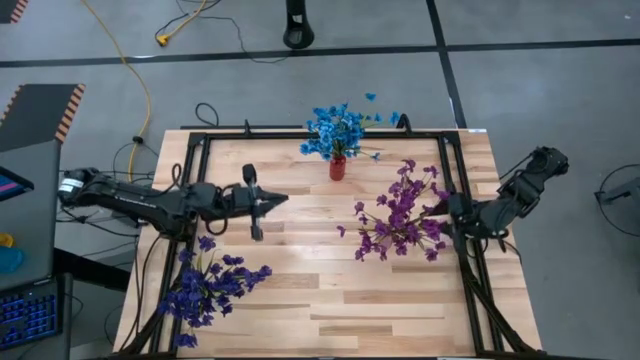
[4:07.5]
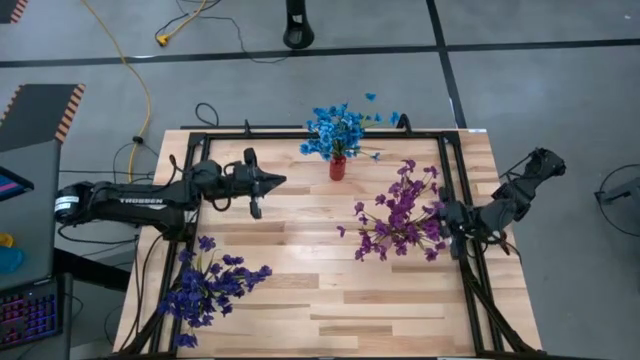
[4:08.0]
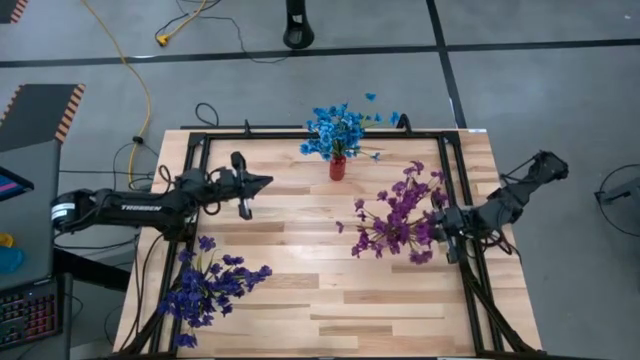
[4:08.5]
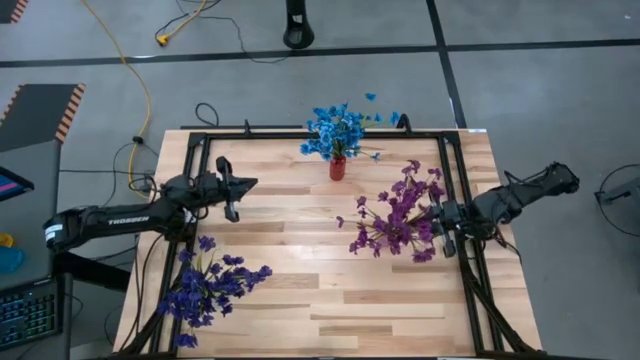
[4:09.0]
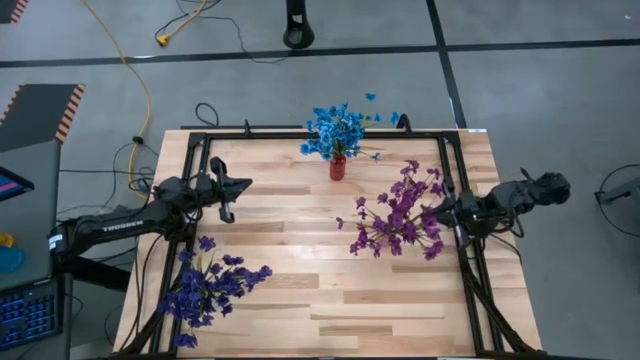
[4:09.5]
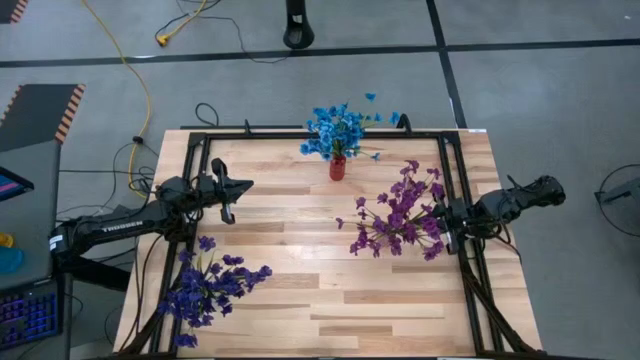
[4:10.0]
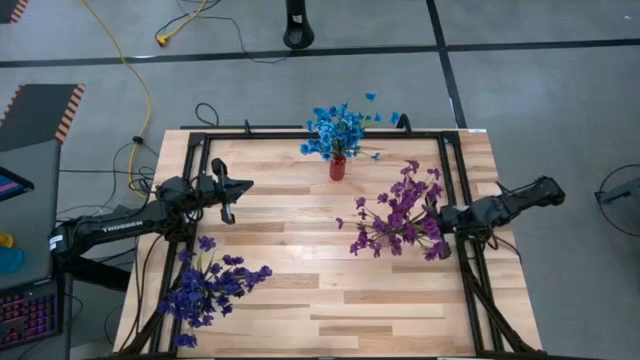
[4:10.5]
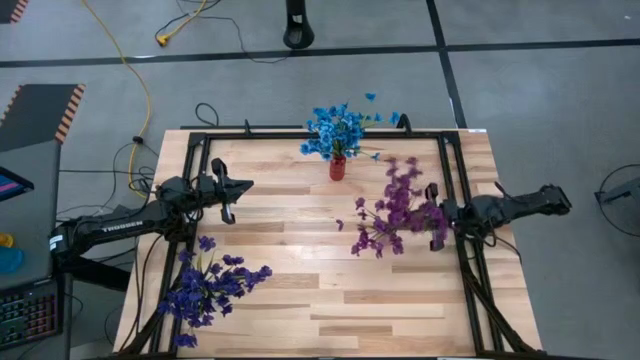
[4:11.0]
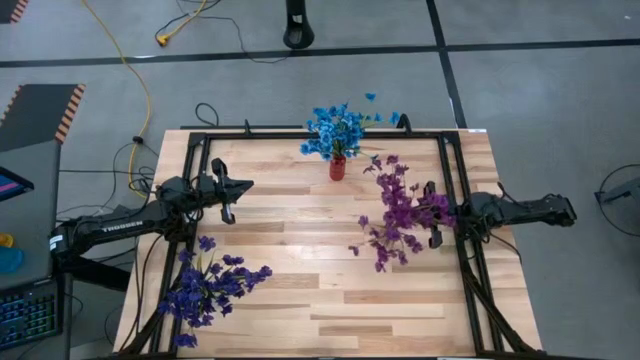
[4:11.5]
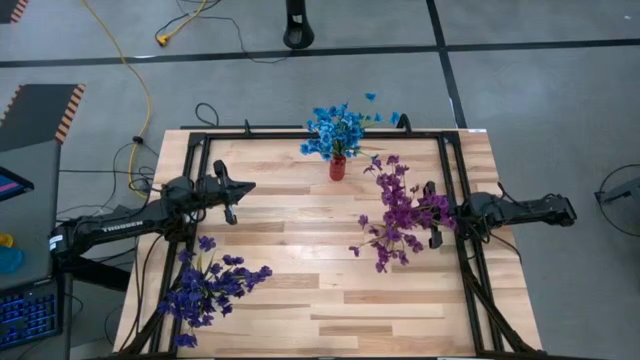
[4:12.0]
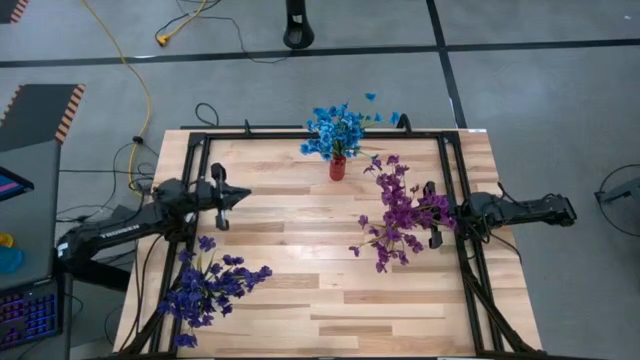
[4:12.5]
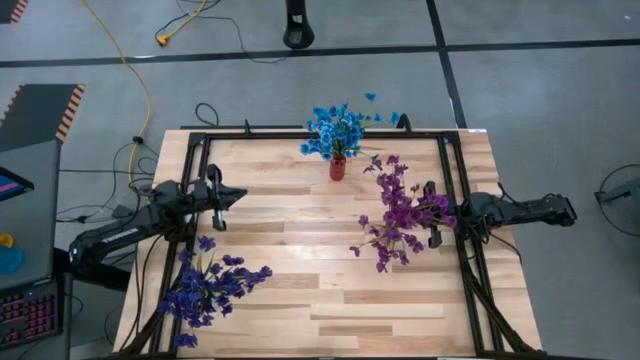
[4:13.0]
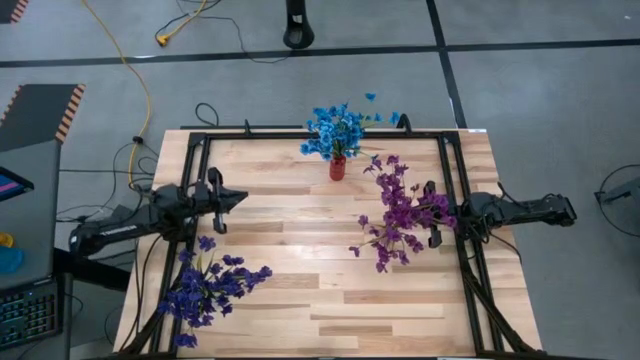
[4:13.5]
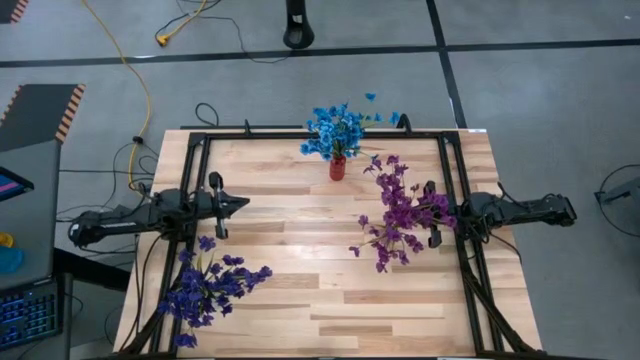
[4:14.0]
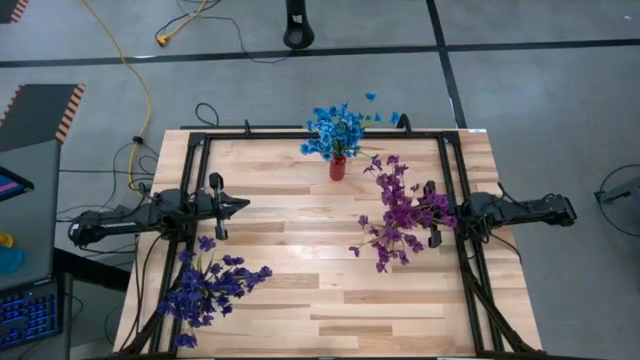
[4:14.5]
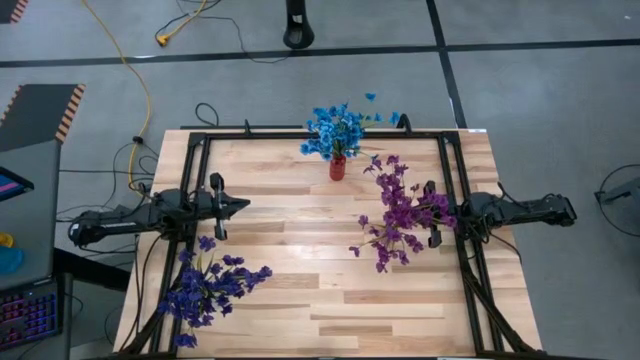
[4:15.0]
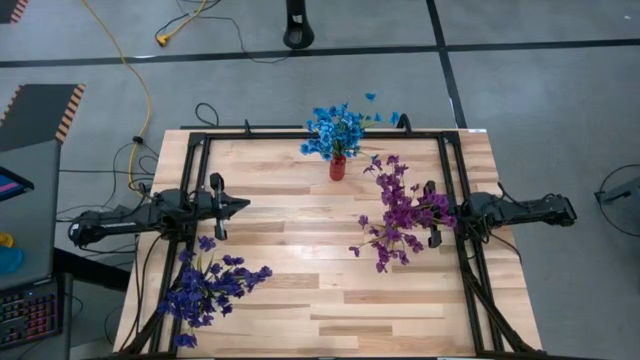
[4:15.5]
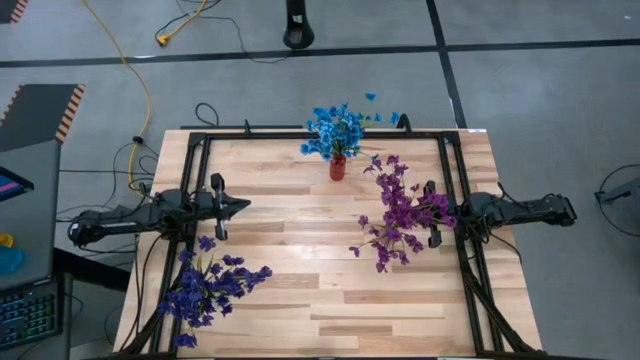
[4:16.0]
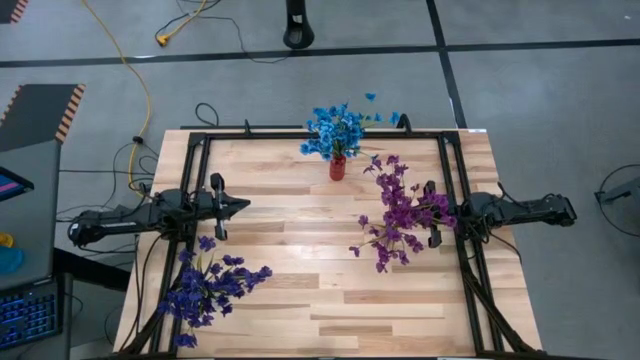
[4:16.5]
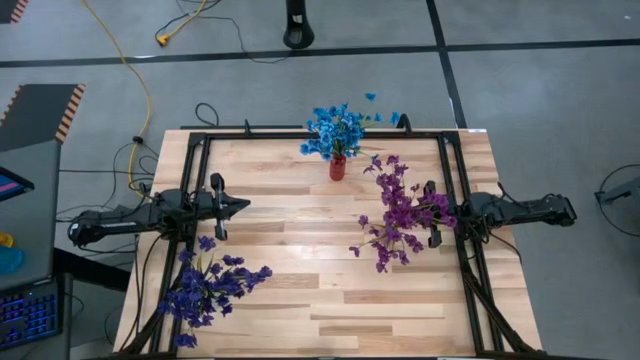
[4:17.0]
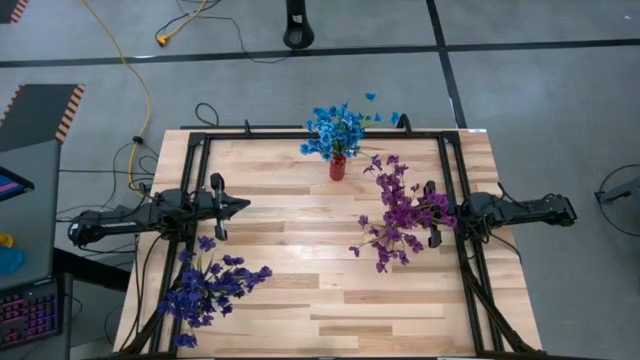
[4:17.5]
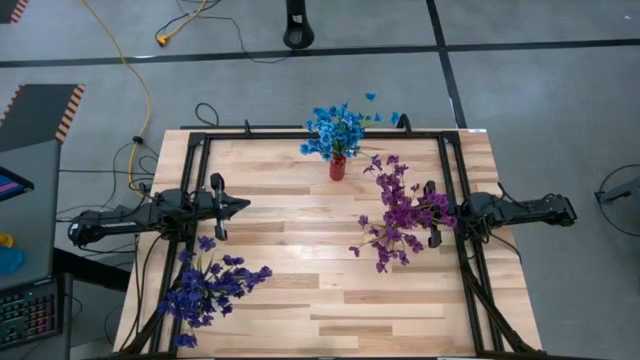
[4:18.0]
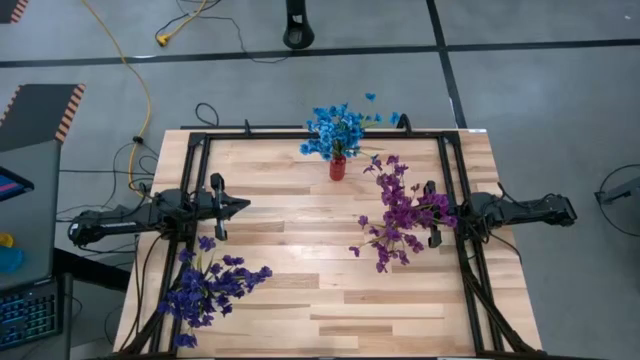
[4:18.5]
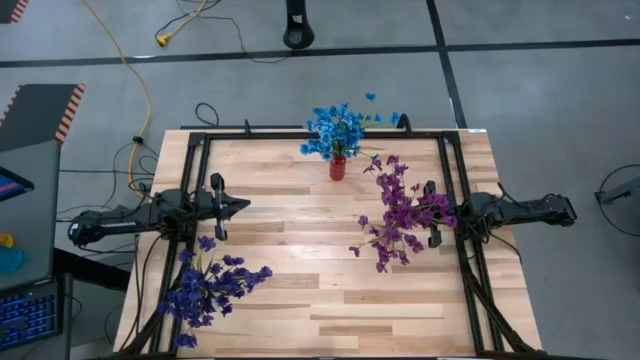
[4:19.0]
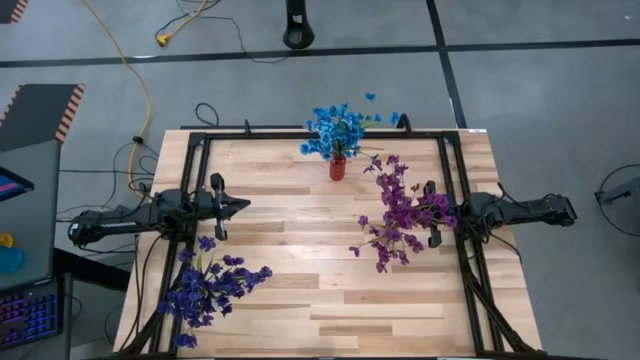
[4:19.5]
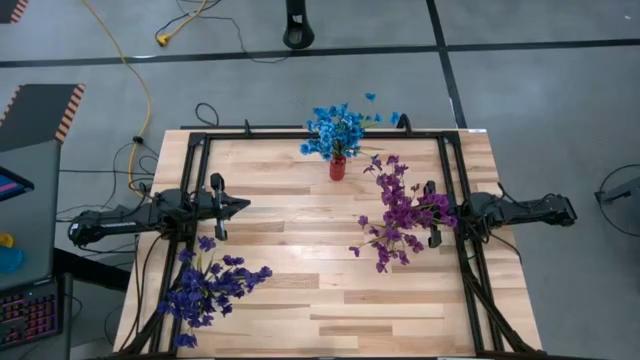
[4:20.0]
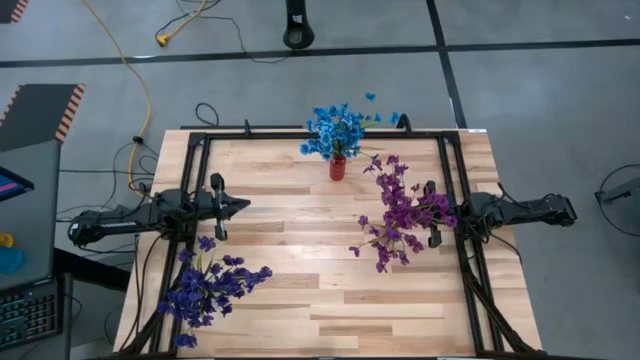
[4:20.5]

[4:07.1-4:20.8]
Task: Sort flowers into vase by color
Return to Home Position

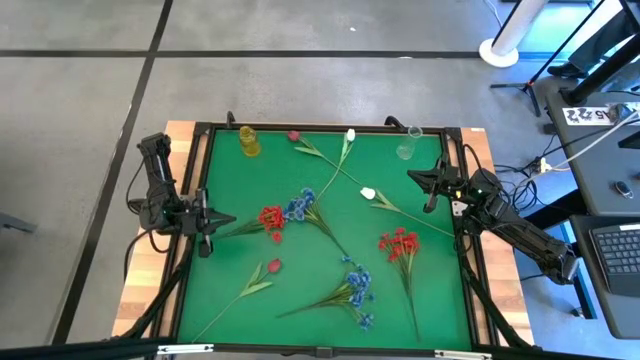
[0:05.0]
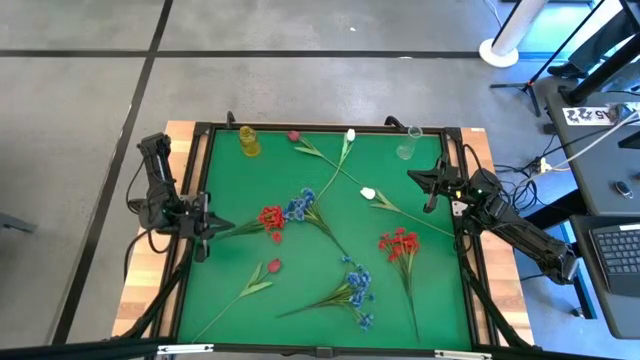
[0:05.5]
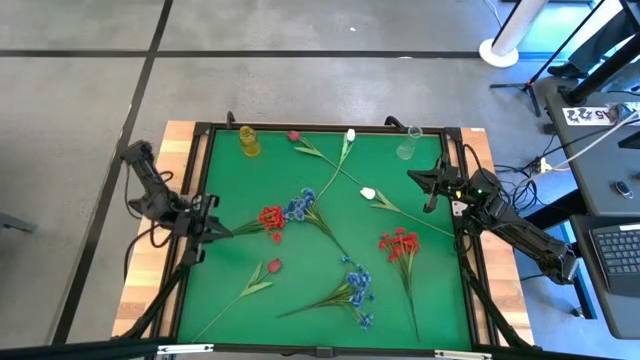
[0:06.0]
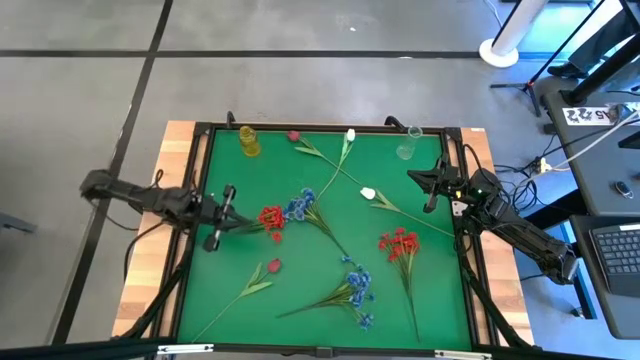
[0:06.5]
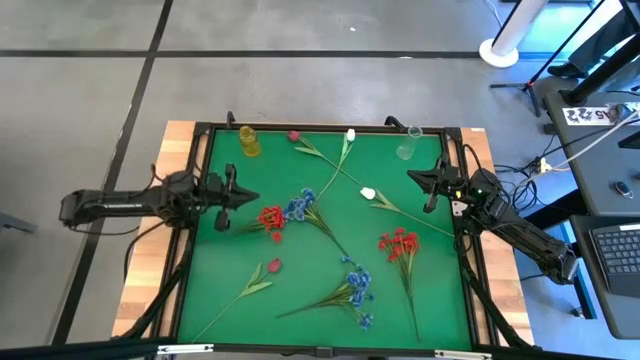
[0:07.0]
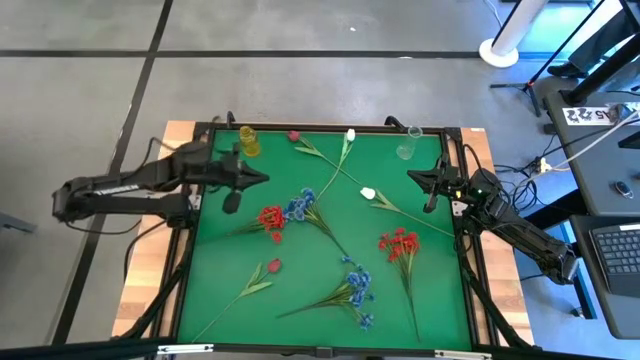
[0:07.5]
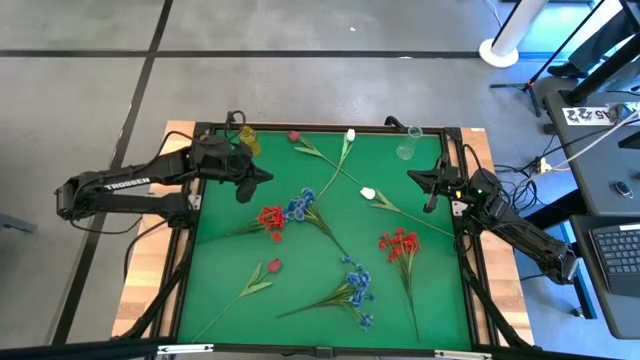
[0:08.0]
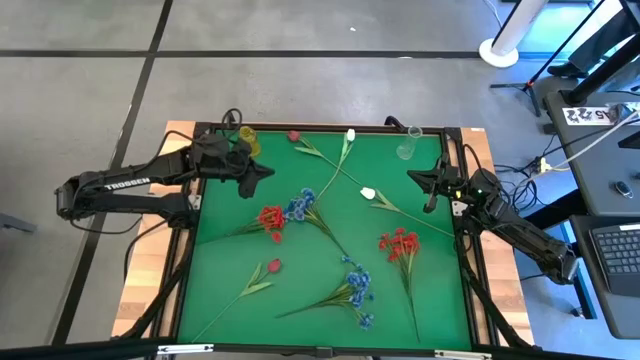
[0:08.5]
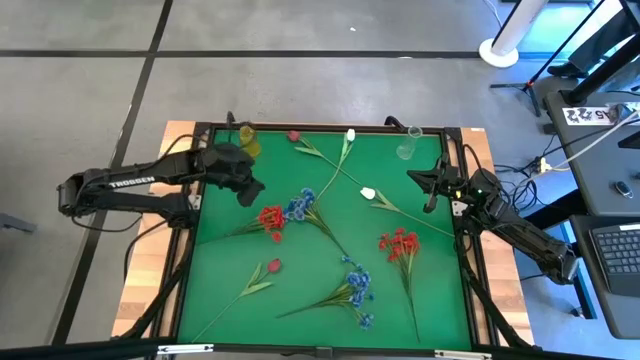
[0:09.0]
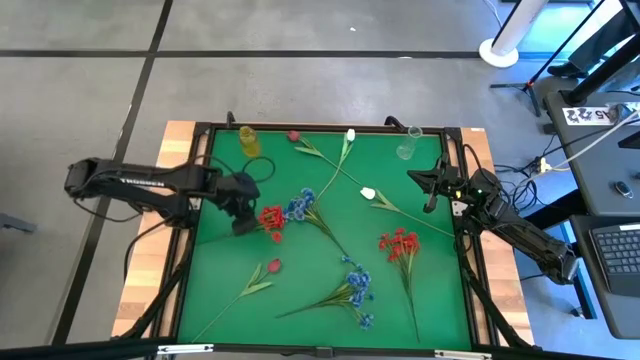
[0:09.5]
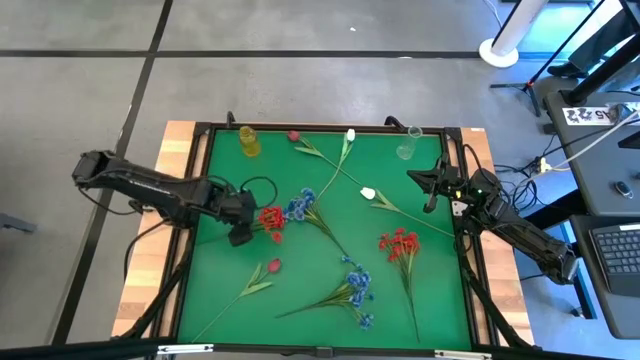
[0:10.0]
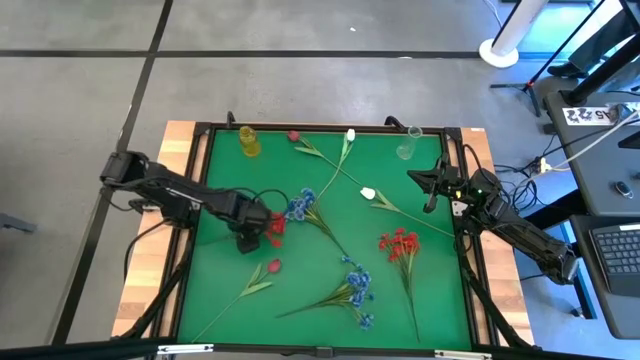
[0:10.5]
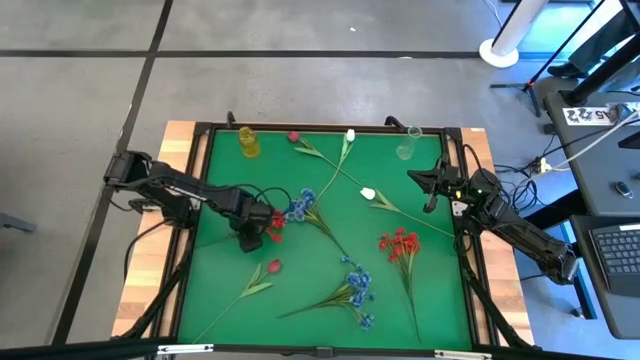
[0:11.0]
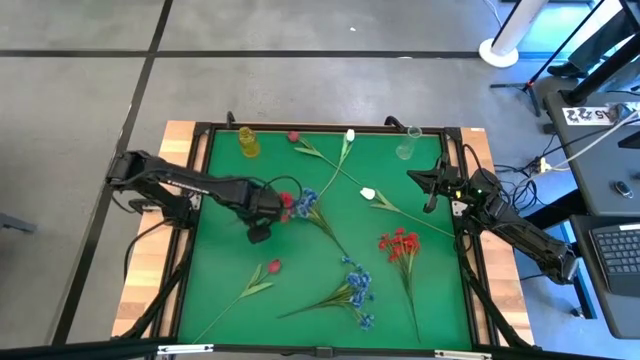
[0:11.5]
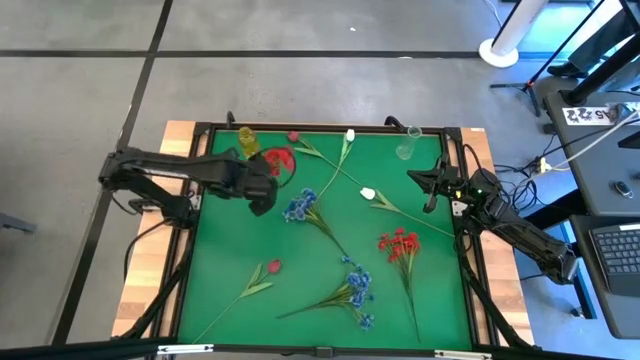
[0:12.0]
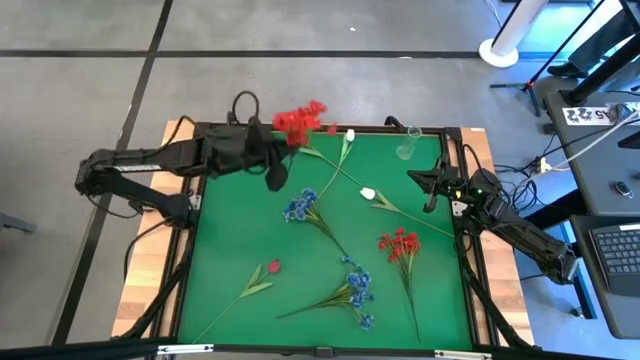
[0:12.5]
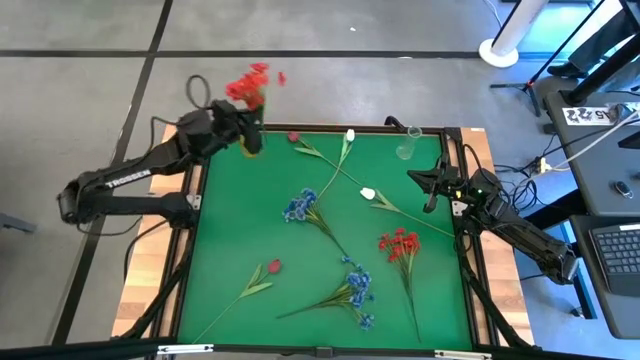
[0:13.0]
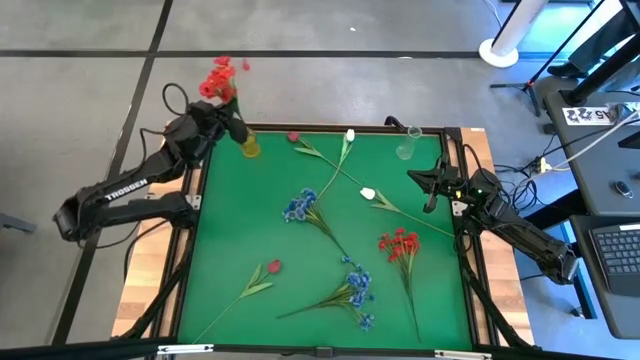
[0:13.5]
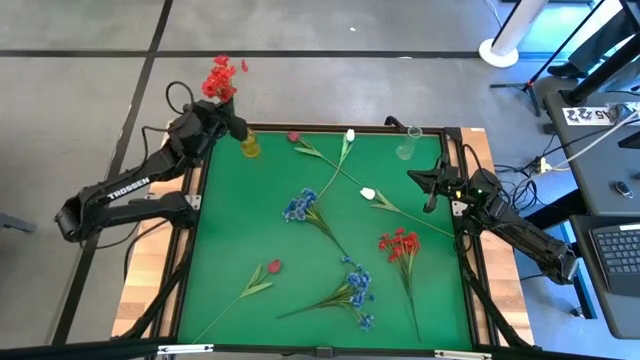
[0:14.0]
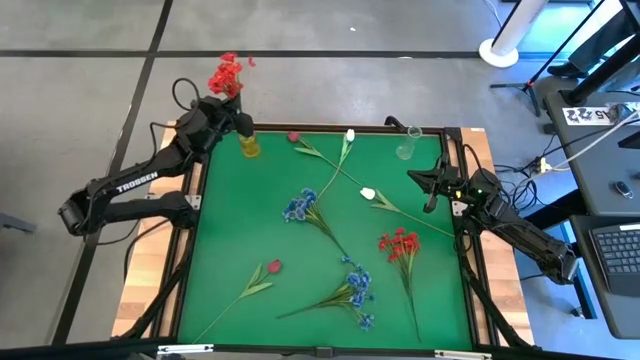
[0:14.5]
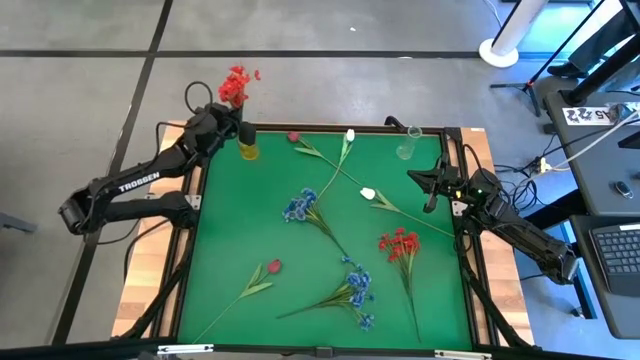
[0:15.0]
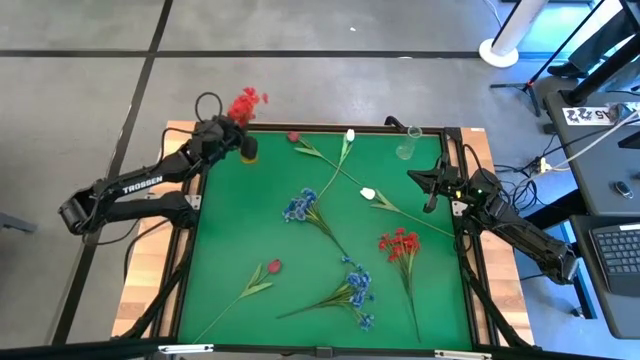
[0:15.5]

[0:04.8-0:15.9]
Task: Sort flowers into vase by color
Put the left orange flowers into the yellow vase
